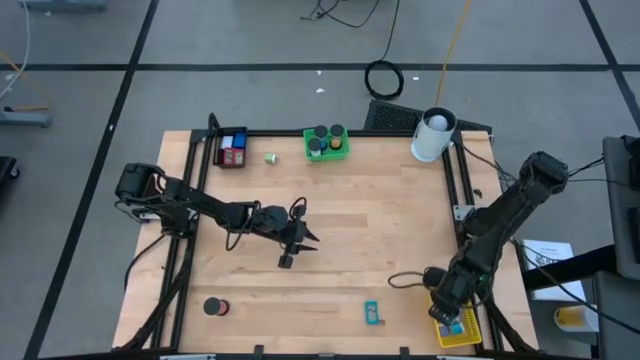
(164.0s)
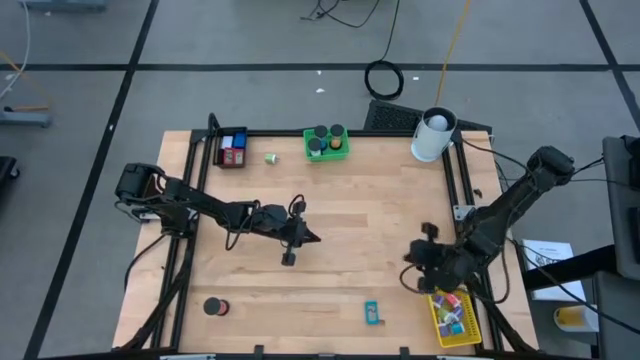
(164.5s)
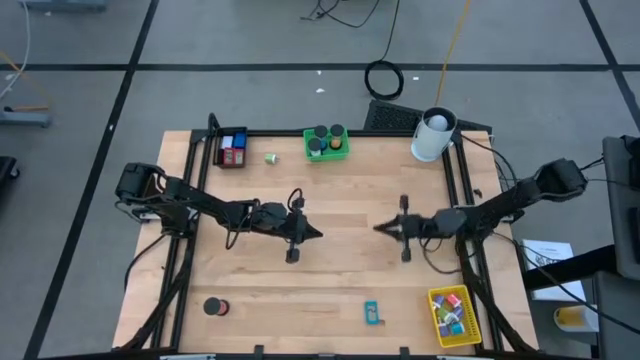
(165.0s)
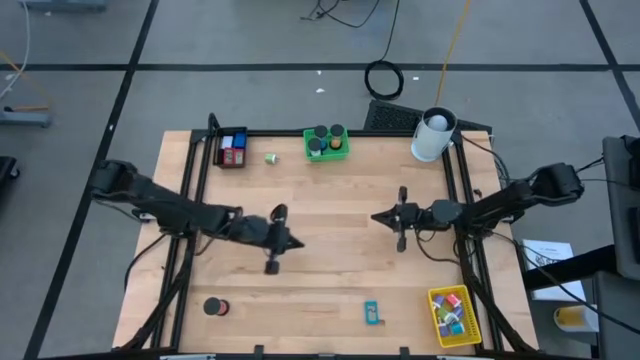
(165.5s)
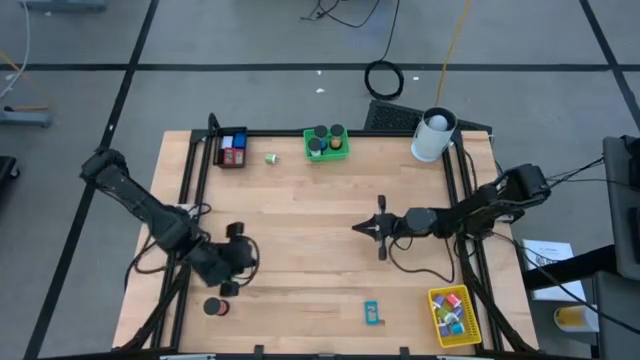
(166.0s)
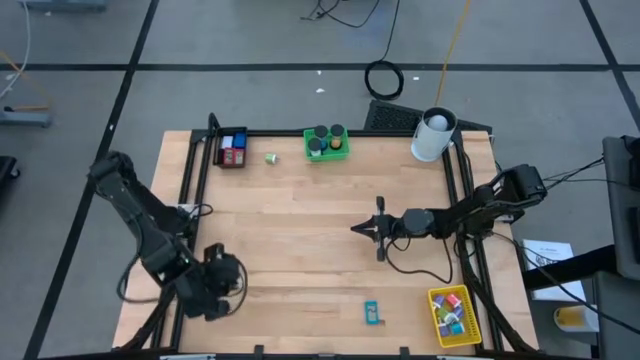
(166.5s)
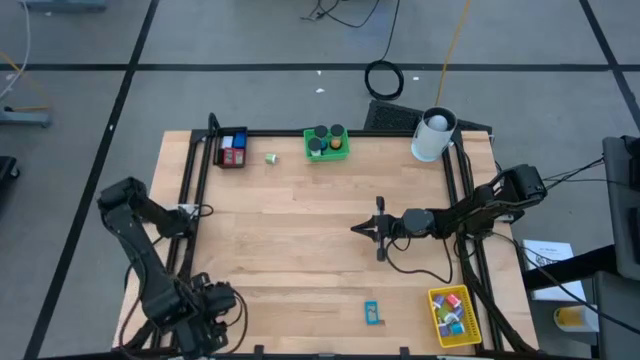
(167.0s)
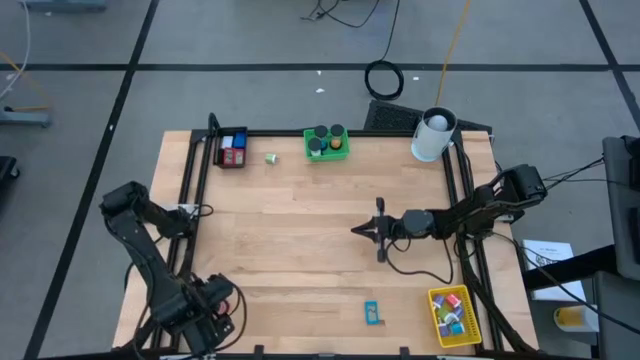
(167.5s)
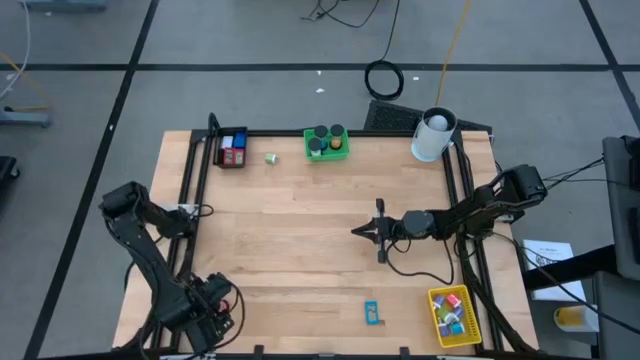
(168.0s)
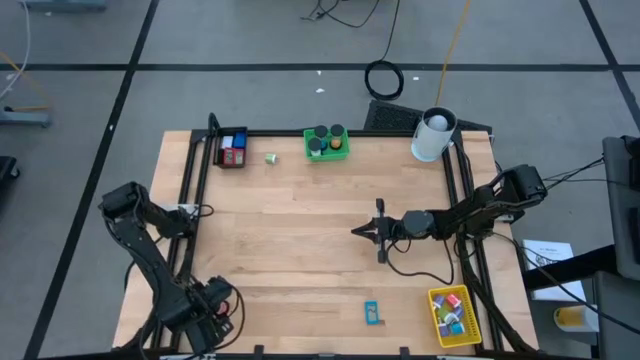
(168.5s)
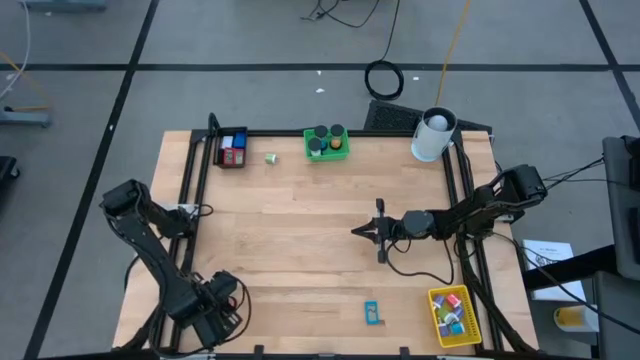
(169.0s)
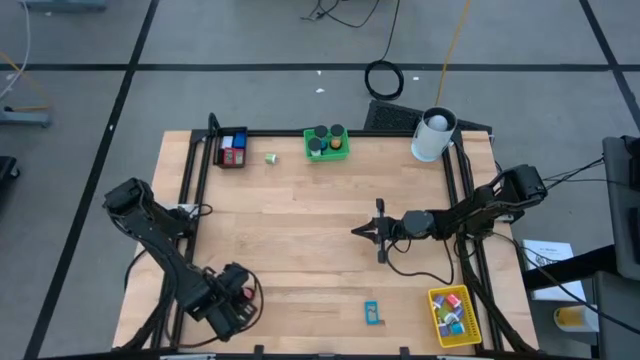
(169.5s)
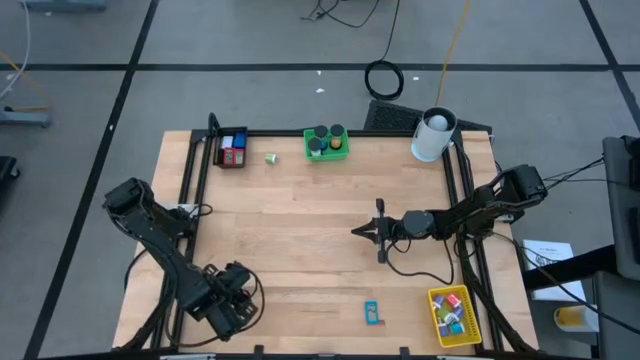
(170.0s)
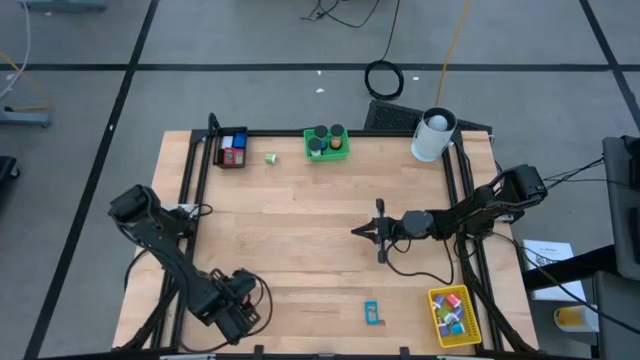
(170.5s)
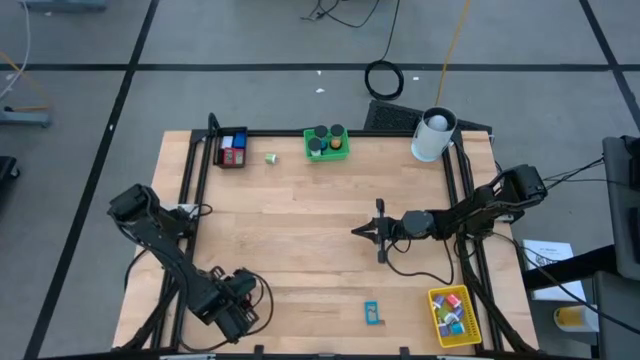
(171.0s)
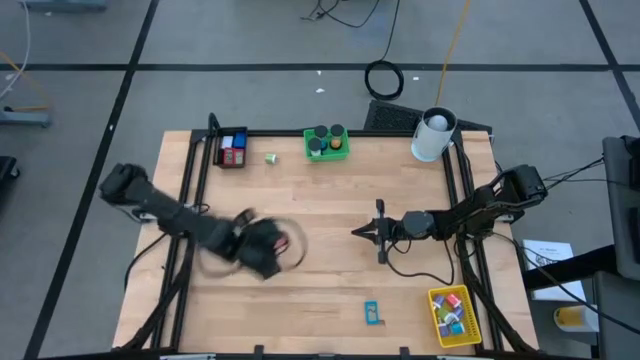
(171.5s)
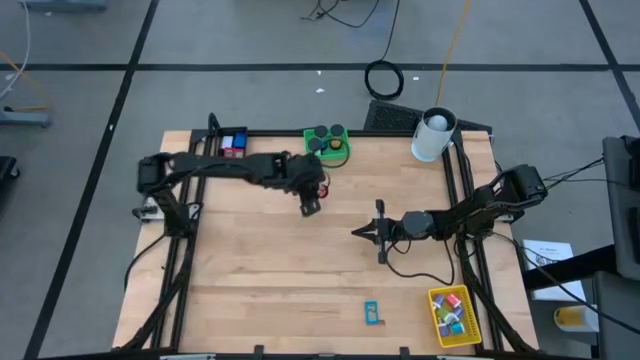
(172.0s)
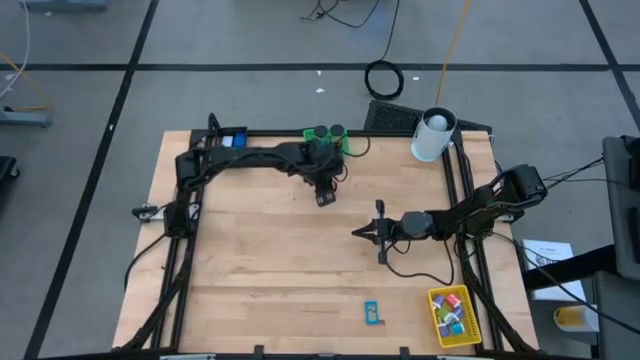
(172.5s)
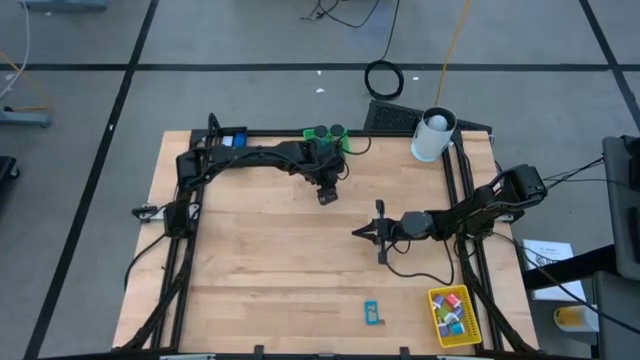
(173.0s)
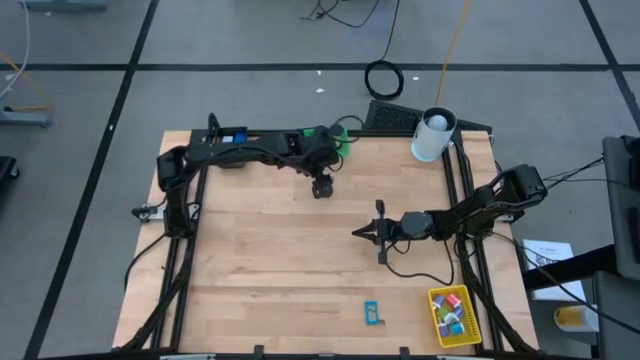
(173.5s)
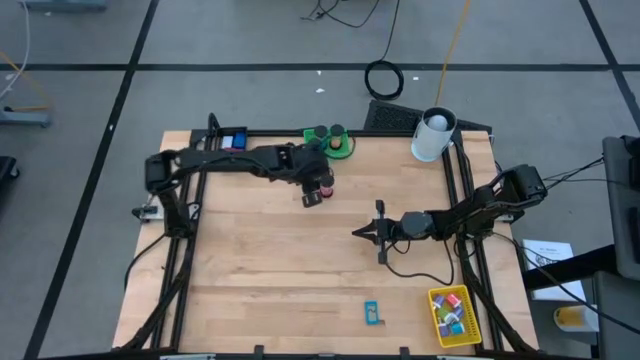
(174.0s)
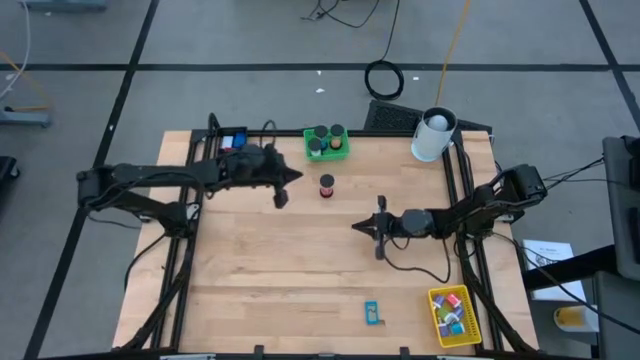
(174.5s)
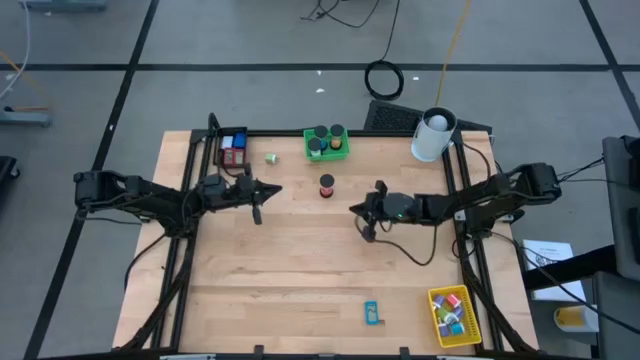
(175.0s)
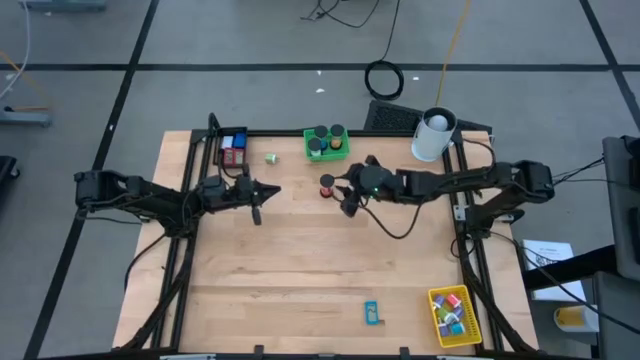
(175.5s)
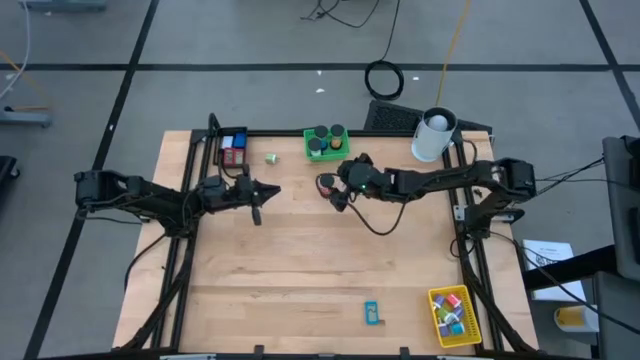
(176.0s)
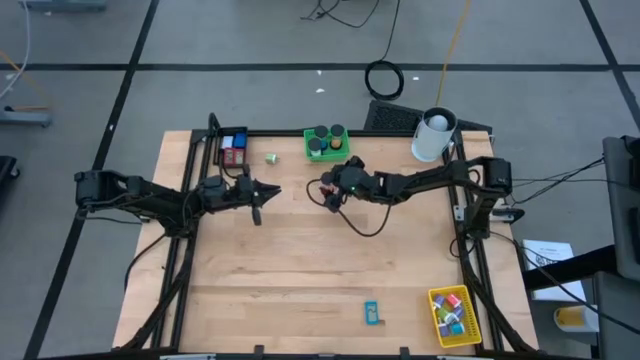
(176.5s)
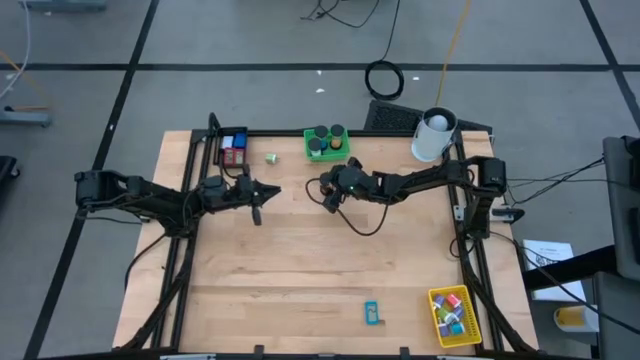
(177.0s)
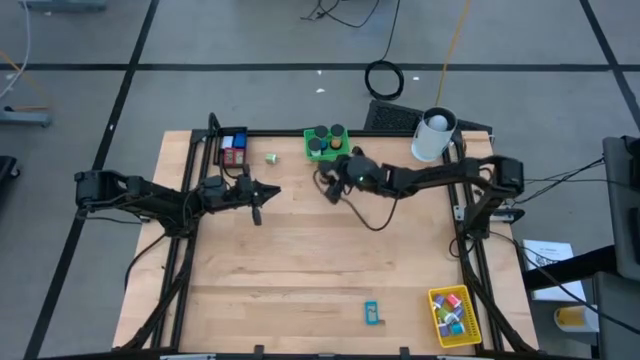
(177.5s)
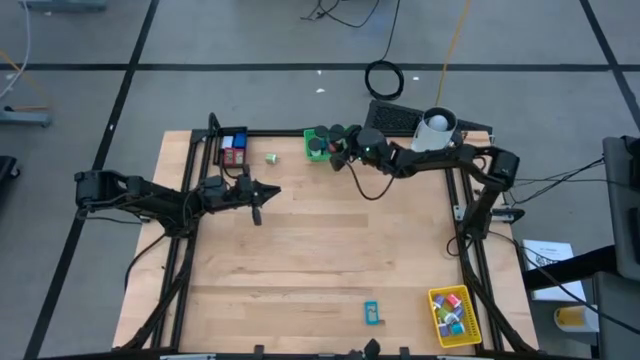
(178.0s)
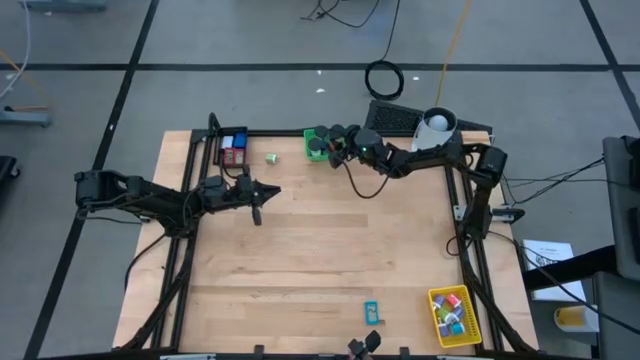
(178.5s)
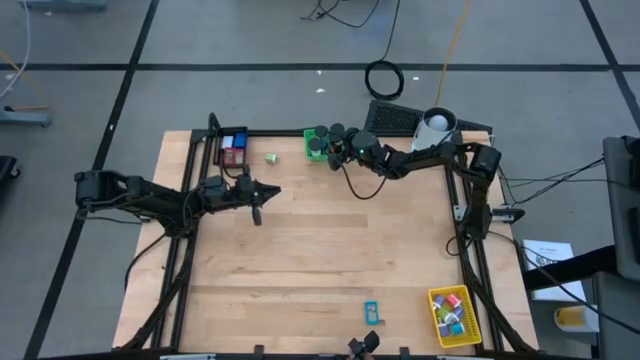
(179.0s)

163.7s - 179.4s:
Task: Pick & Place Office items
Put the red hourglass into the green basket

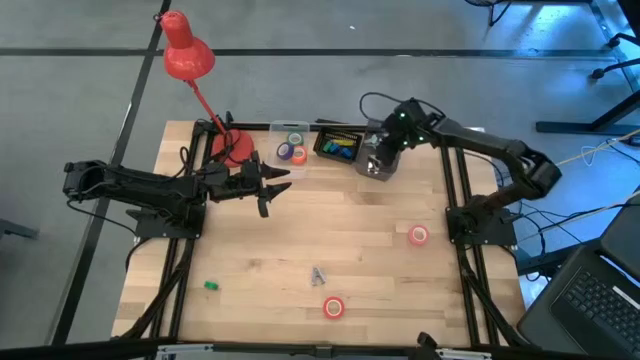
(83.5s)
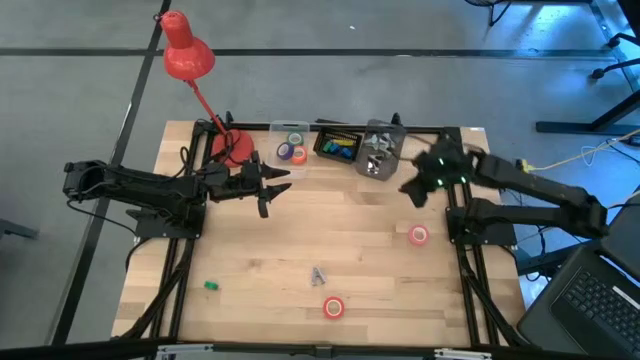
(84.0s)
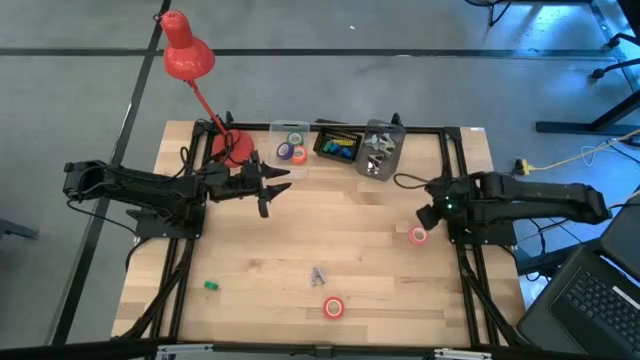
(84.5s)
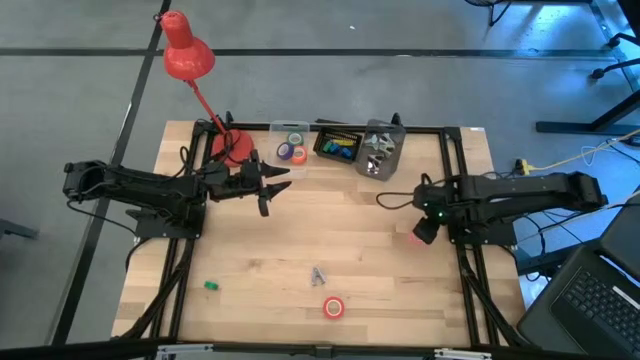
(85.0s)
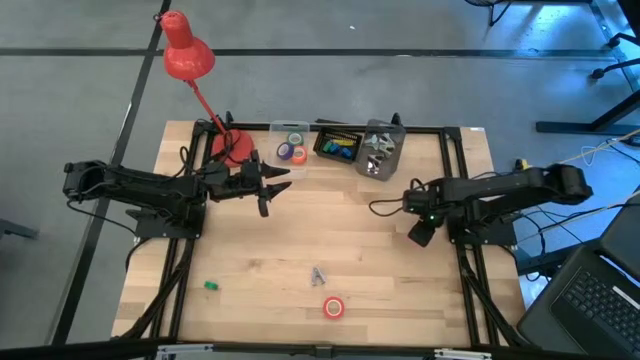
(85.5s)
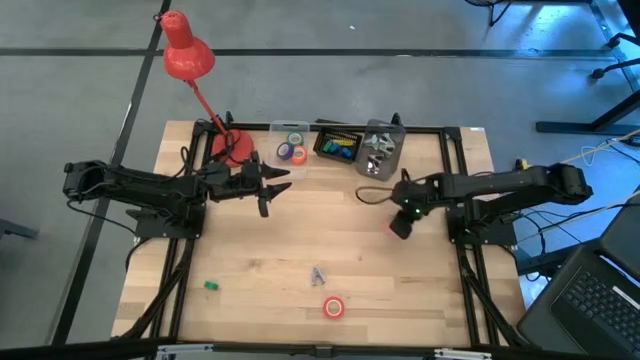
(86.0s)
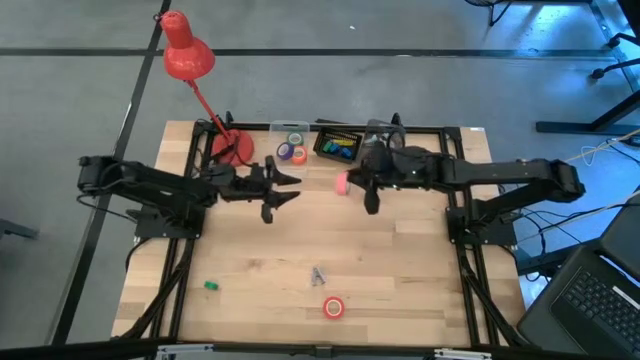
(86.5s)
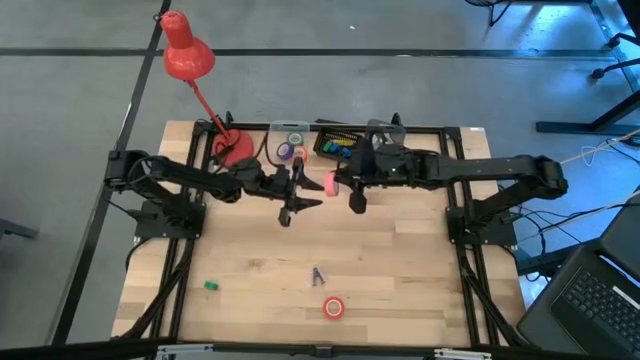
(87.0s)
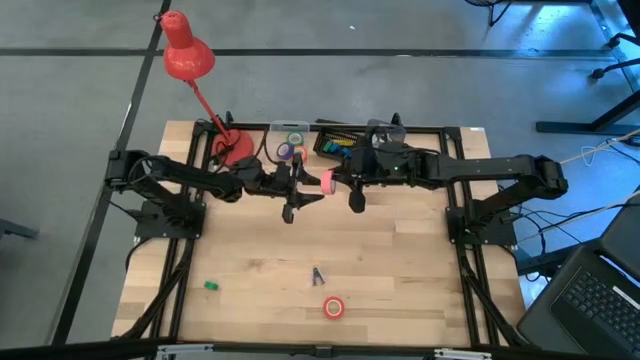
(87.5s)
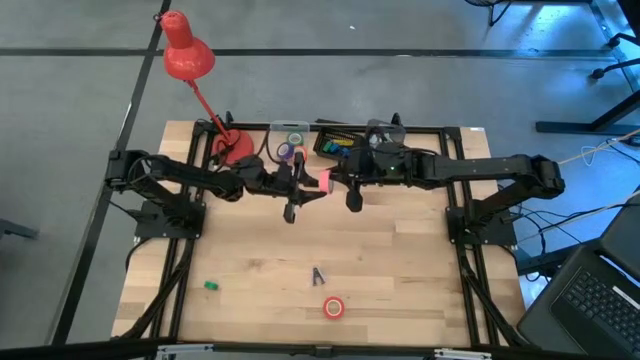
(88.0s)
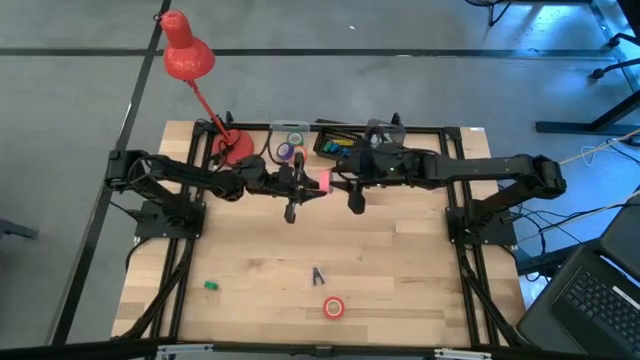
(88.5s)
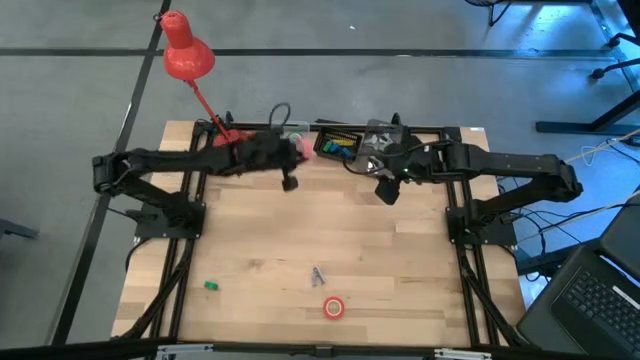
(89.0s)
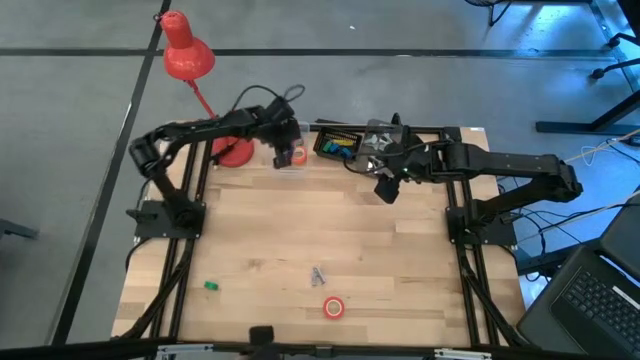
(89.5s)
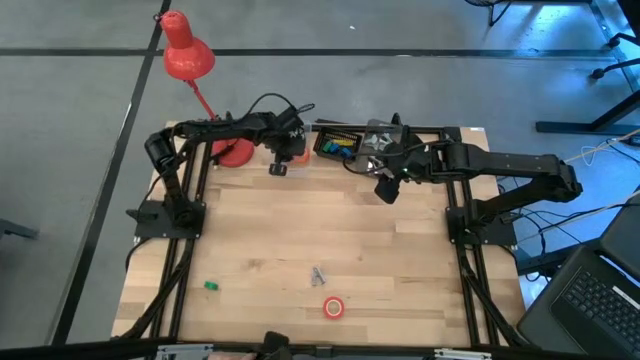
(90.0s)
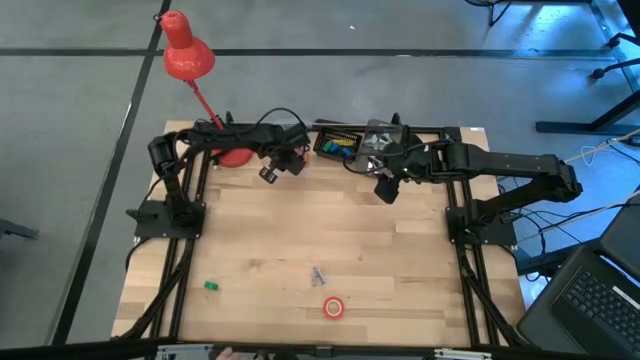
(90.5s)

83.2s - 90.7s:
Task: Pick and place Stapler, Stapler remover, tape
Put the pink tape into the transparent bin
